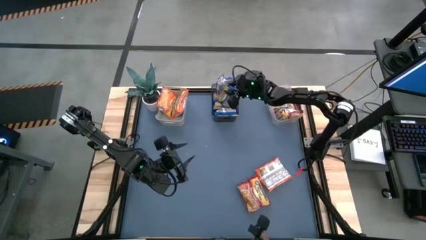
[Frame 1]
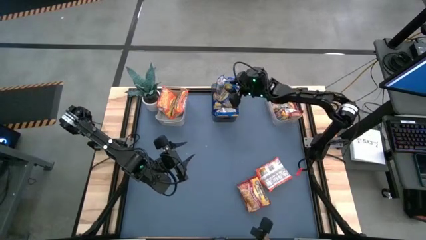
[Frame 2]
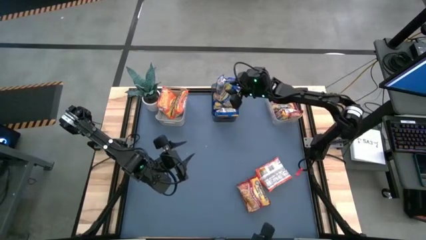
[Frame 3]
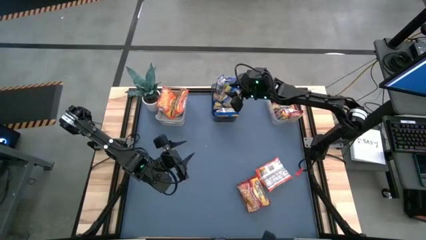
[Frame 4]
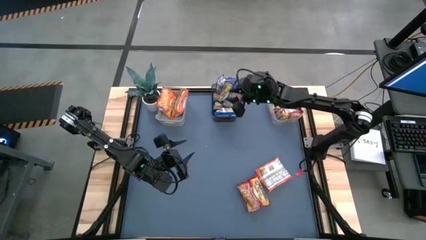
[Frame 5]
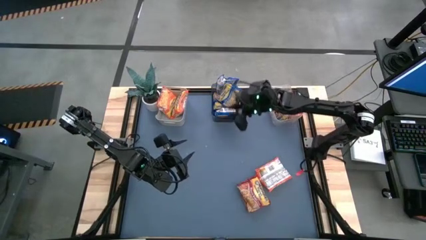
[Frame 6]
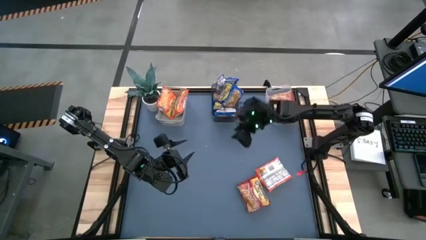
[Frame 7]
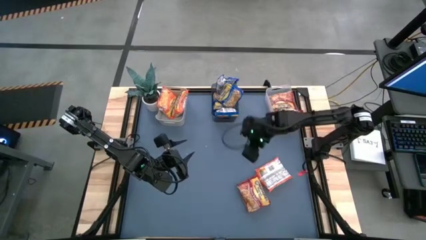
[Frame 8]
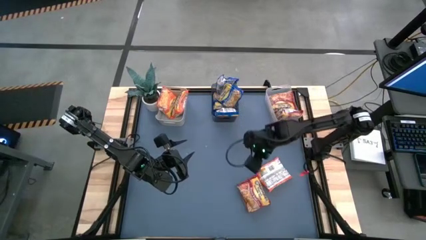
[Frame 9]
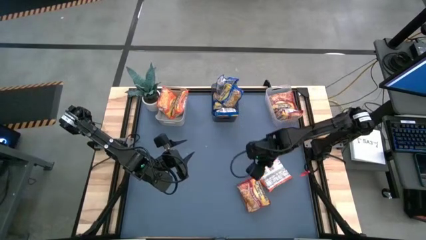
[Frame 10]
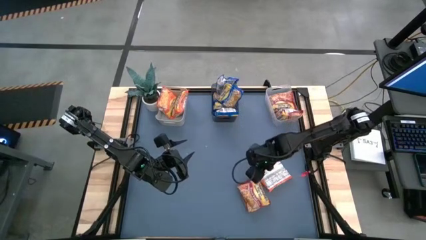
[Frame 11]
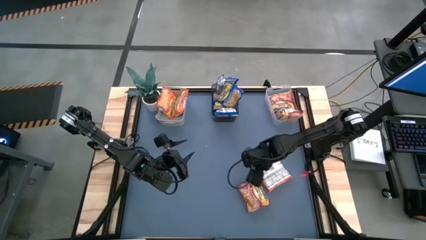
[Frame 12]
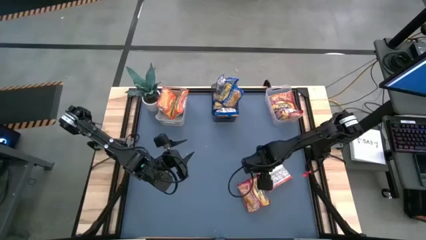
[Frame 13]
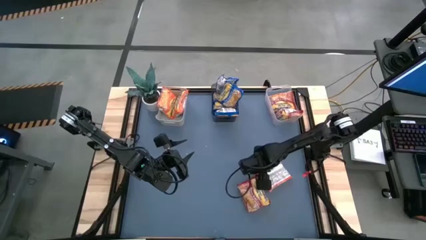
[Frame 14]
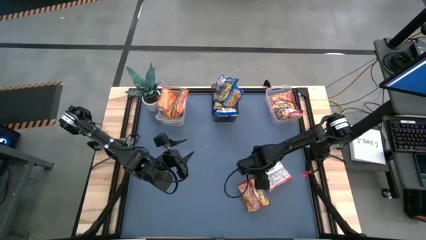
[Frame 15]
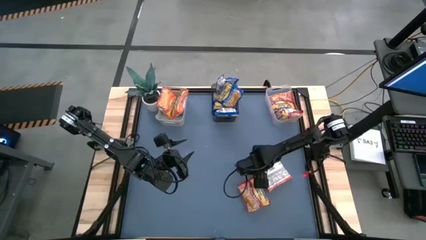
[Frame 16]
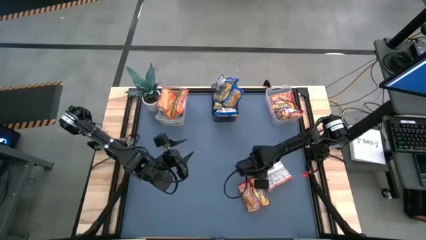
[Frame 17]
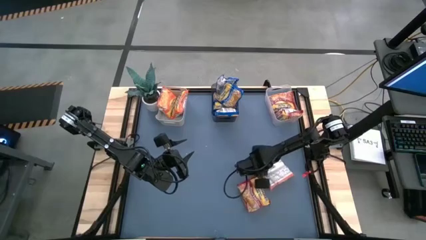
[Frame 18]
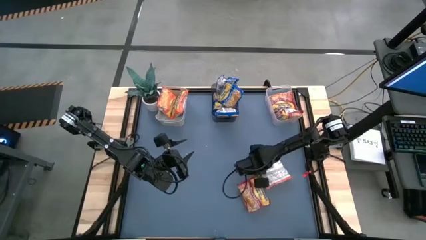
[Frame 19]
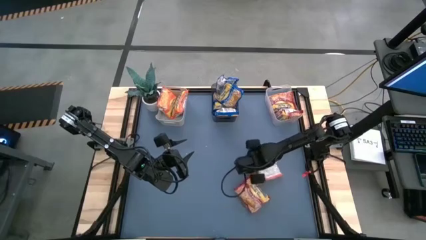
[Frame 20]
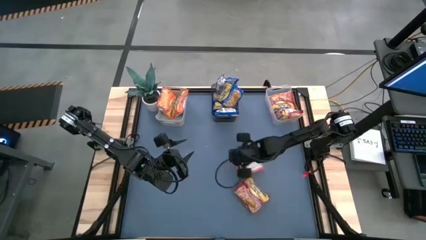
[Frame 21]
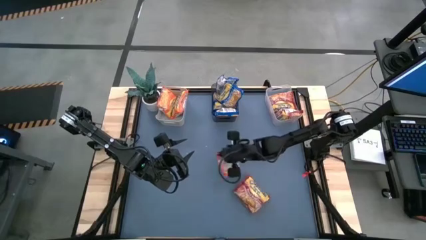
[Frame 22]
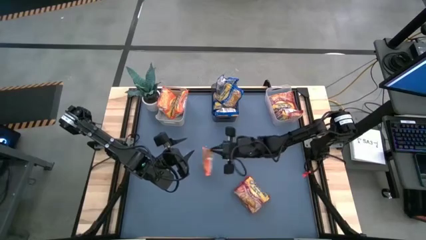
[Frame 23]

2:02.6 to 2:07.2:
Task: Sort Maruchan noodles
Put the orange noodle pack into the gray bin

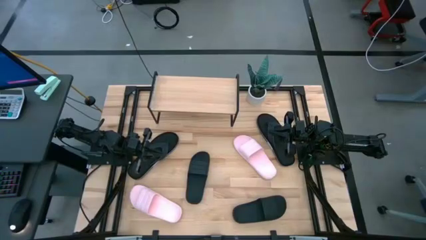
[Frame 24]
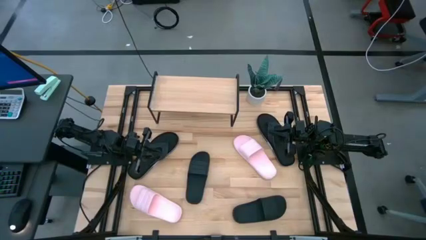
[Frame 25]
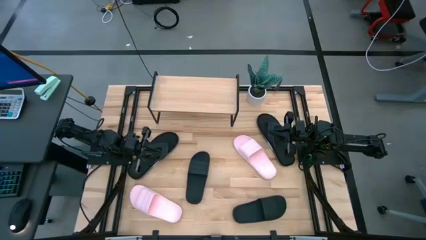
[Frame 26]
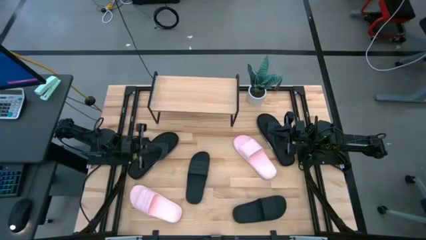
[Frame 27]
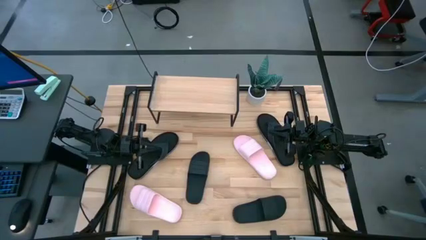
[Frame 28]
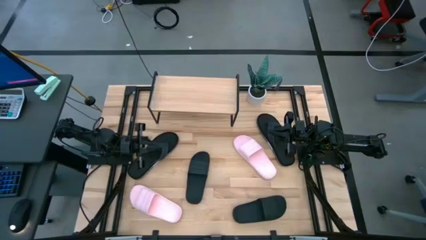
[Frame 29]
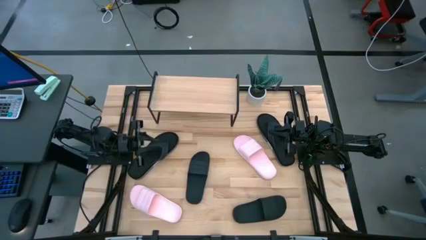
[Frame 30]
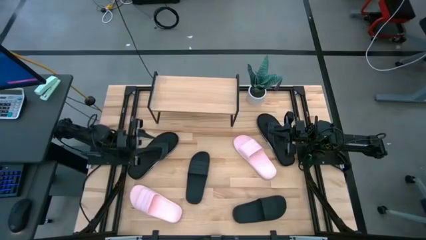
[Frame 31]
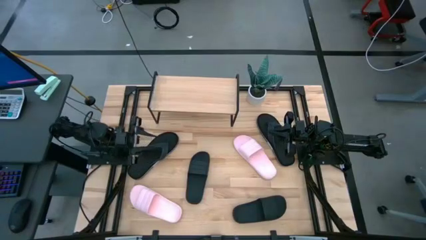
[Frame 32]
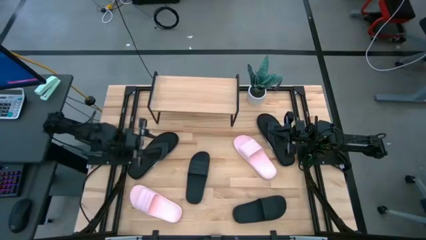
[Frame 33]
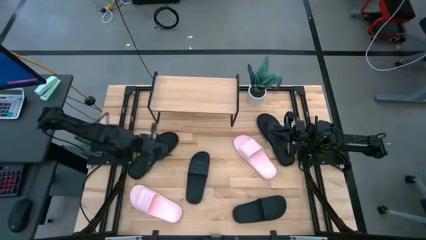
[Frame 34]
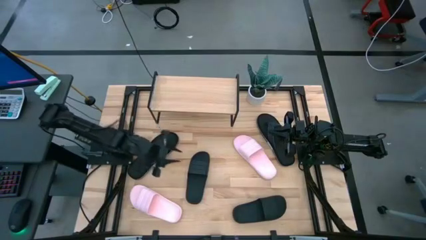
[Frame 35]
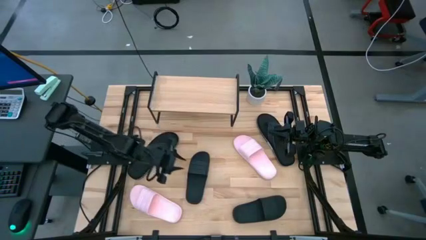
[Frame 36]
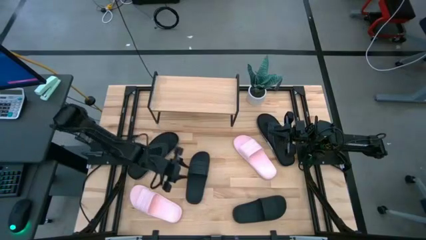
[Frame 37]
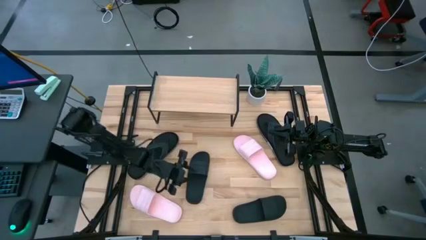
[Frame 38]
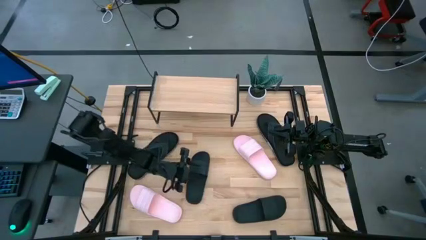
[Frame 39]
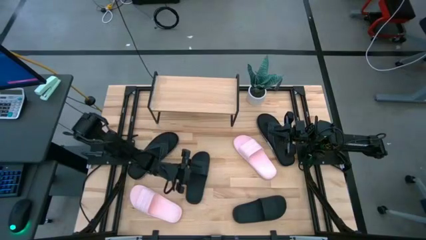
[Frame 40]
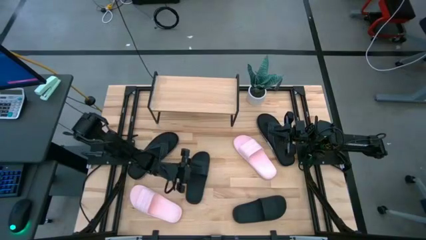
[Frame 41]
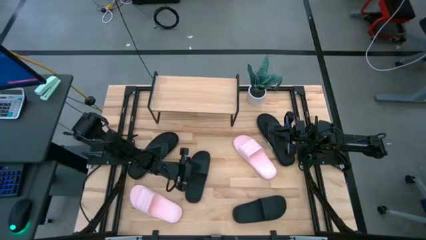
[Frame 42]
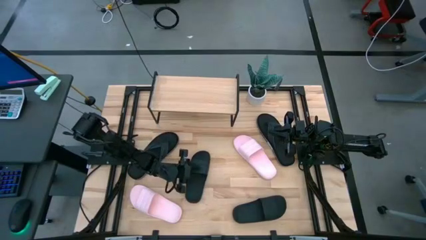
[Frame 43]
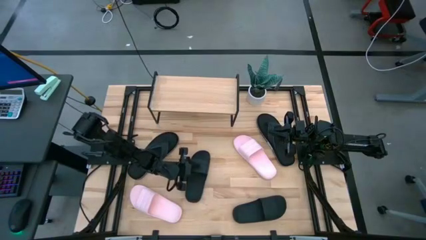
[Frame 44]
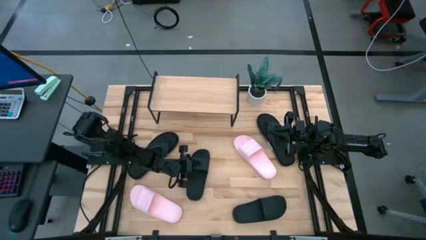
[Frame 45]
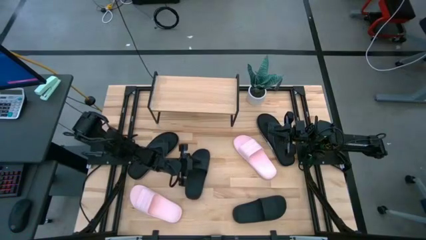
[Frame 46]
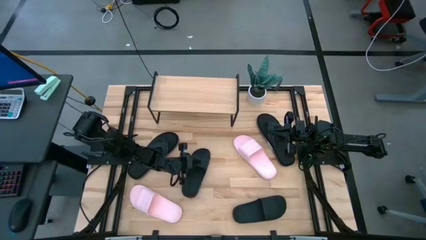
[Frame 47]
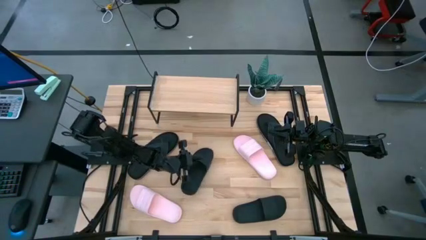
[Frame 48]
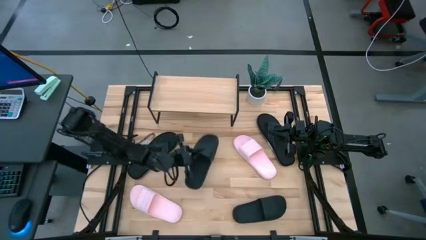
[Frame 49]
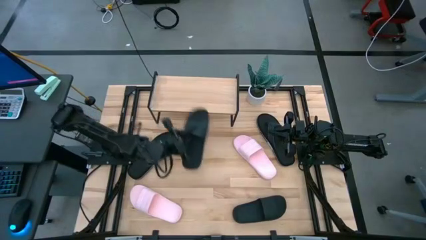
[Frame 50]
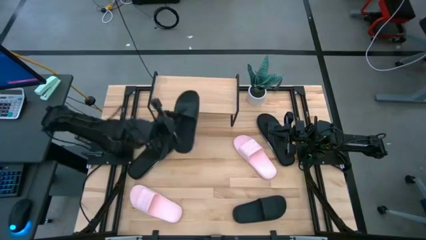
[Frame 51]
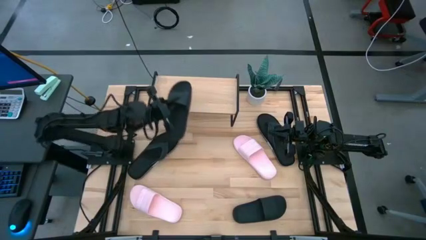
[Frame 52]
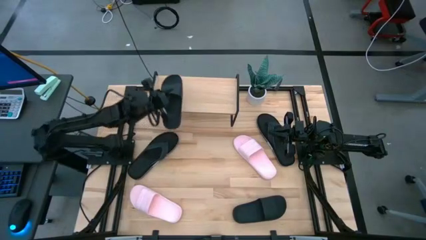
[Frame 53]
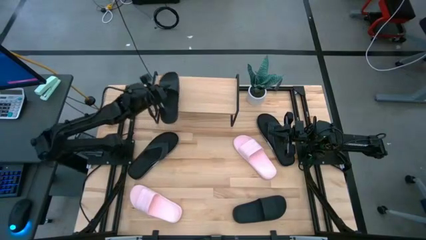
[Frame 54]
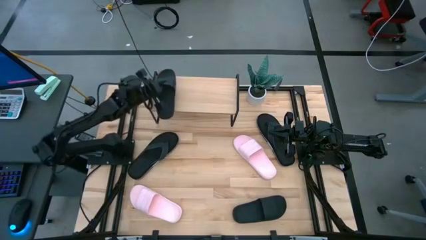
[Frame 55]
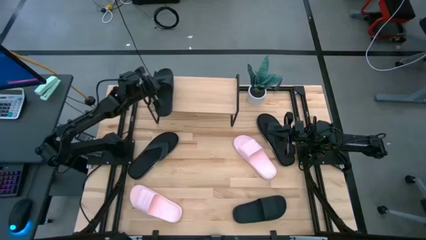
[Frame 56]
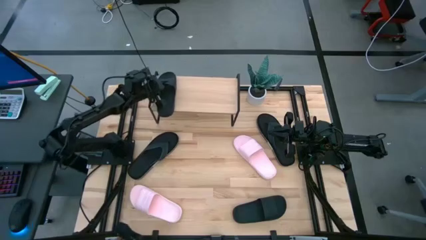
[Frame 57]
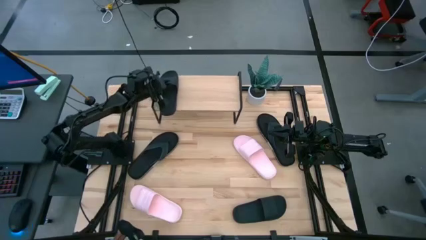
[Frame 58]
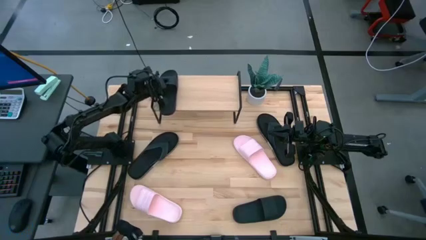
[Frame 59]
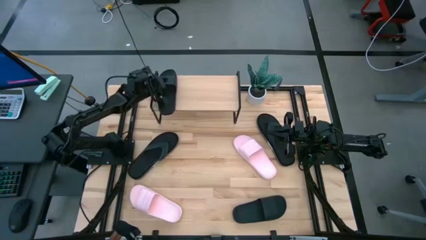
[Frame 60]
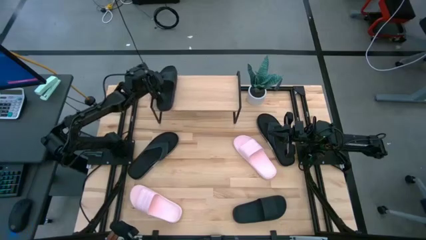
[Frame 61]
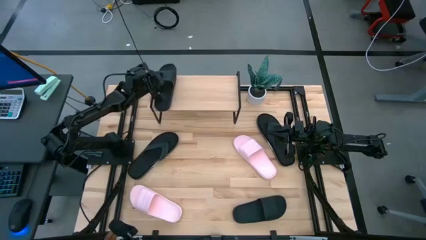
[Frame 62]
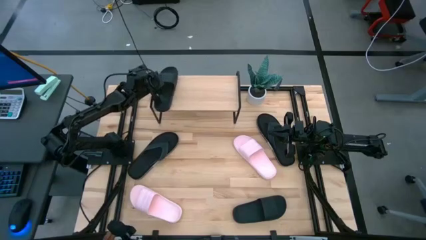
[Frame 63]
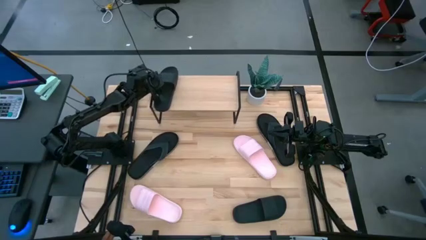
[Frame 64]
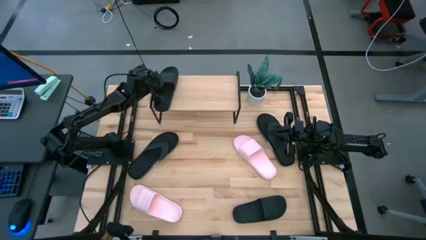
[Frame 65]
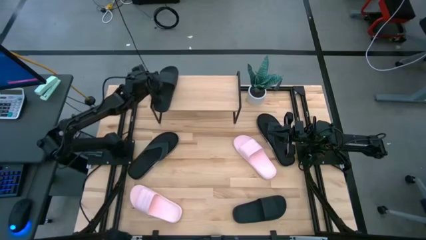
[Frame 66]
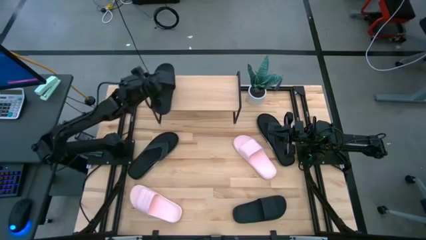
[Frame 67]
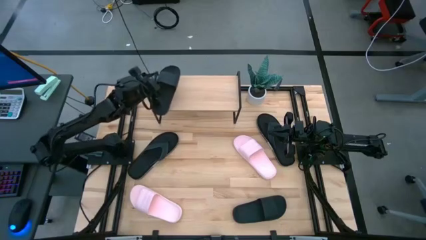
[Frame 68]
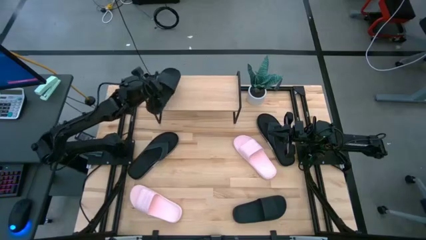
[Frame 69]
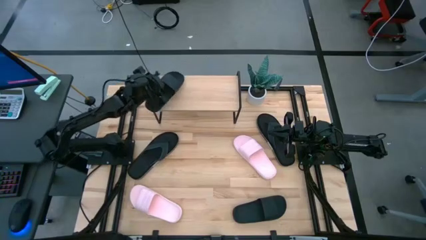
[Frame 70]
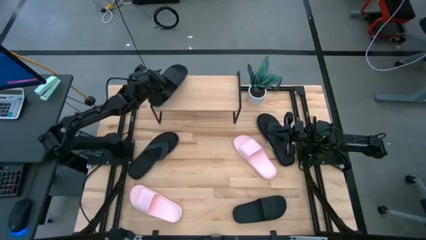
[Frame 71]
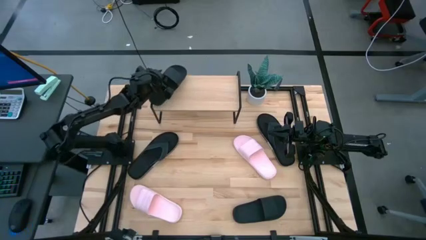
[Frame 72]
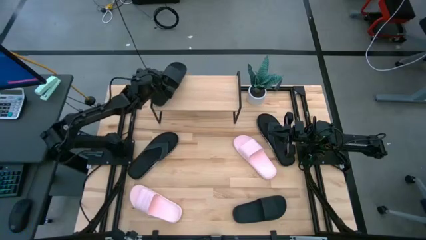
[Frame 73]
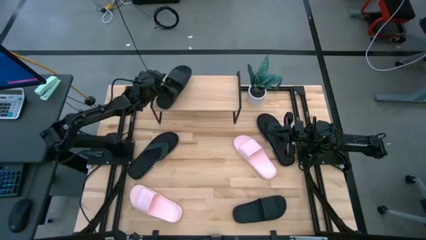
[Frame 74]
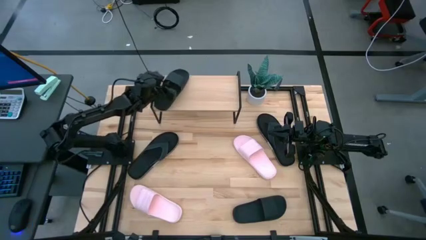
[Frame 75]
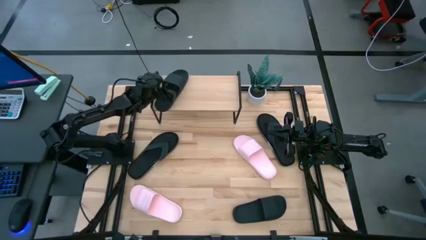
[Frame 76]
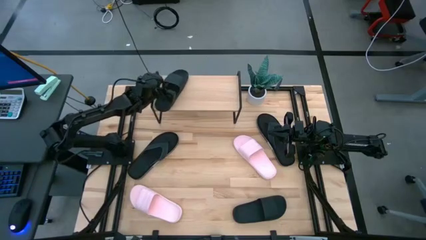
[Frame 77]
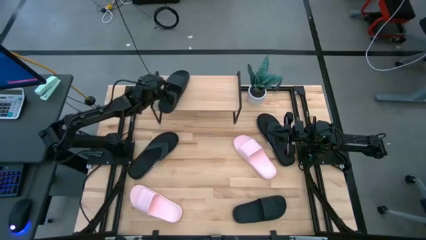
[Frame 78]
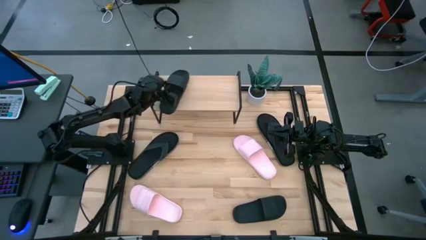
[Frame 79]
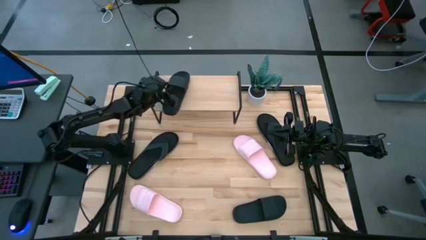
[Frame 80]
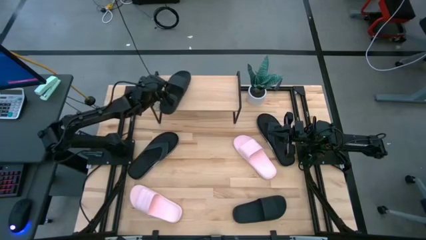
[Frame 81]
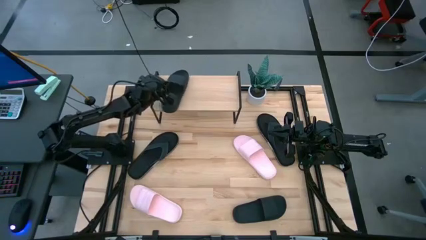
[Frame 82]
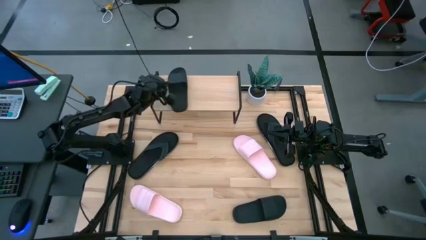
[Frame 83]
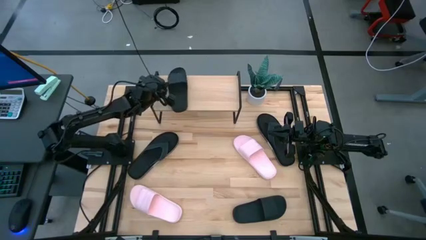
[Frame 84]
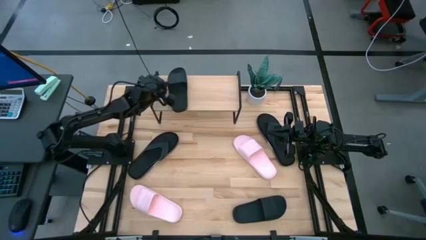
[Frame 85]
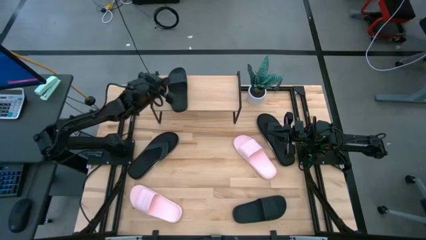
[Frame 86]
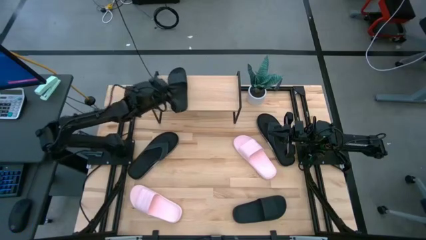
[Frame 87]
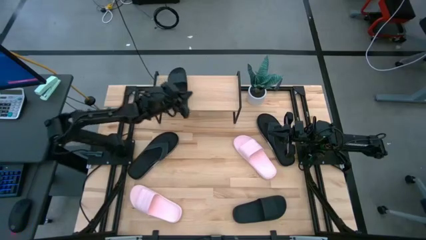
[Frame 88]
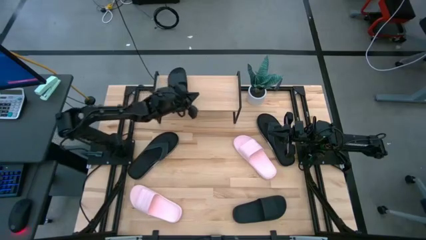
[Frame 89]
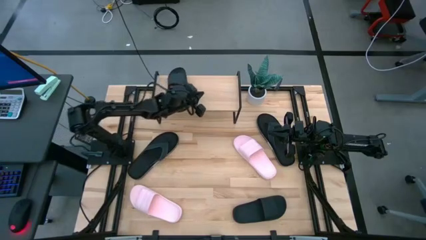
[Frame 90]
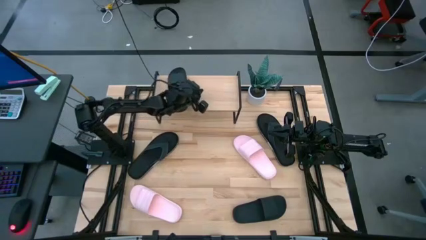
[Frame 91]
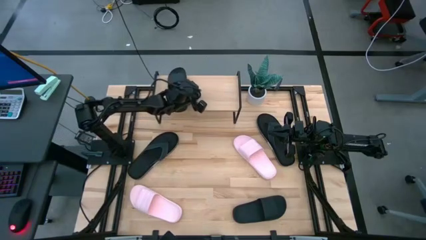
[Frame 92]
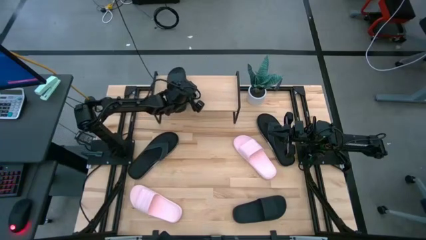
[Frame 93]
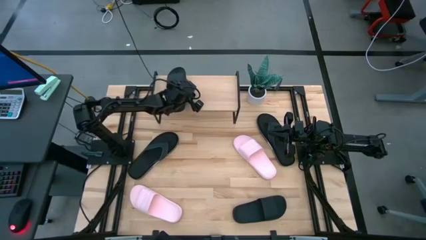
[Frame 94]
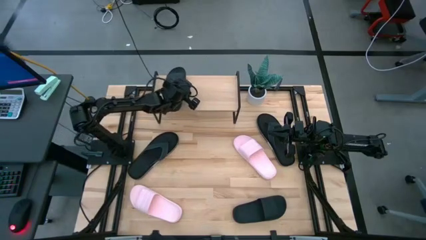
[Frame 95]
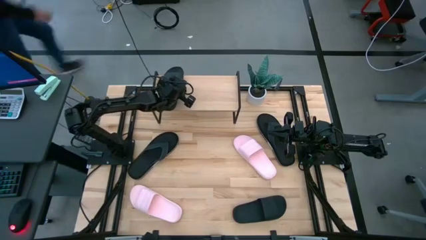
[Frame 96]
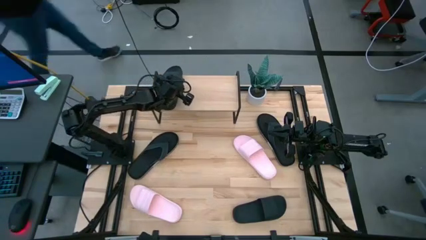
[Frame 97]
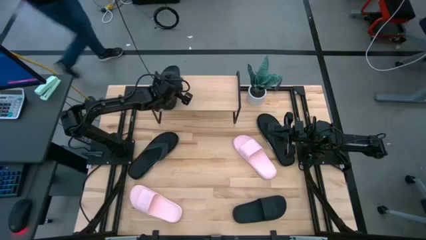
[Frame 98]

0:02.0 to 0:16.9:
Task: Pick and place slides into the shelf
Put the right black slipper on the shelf
